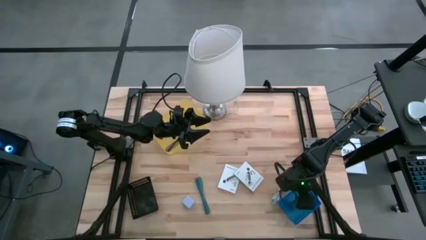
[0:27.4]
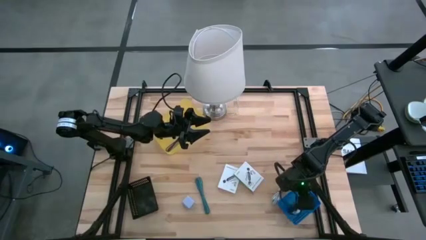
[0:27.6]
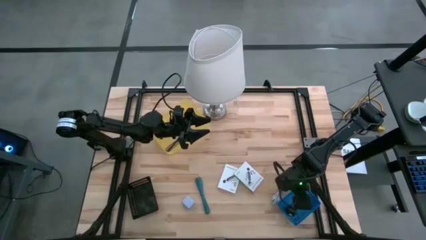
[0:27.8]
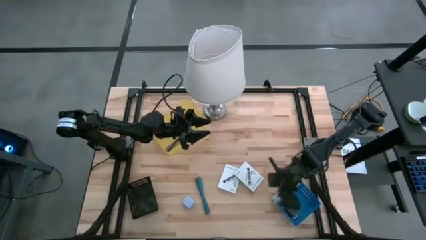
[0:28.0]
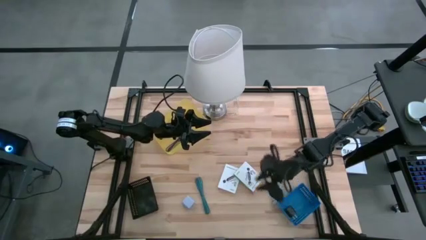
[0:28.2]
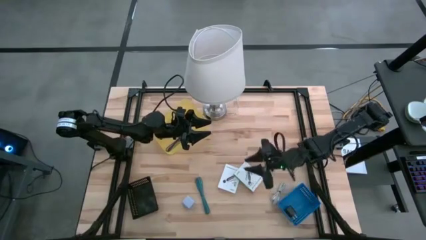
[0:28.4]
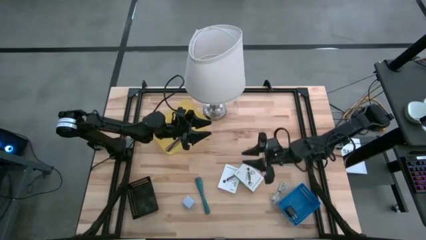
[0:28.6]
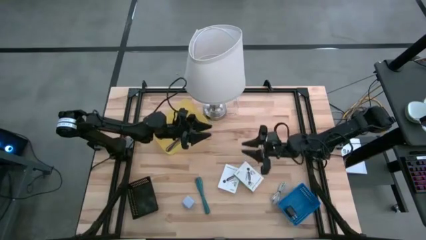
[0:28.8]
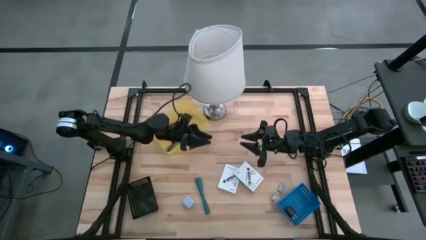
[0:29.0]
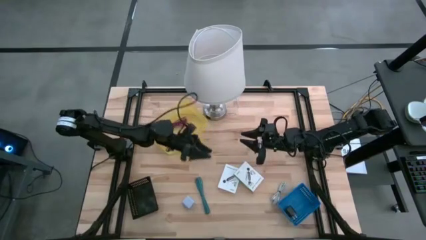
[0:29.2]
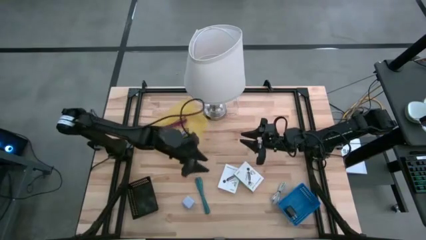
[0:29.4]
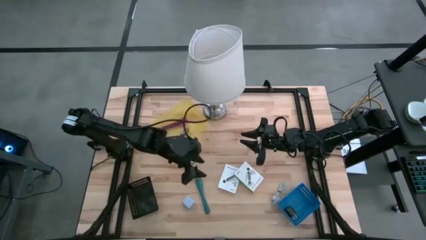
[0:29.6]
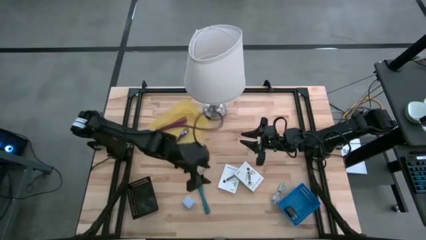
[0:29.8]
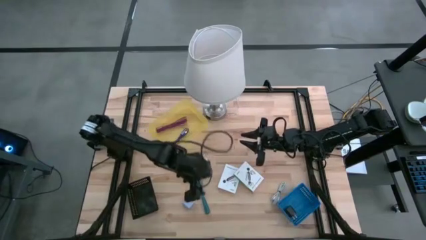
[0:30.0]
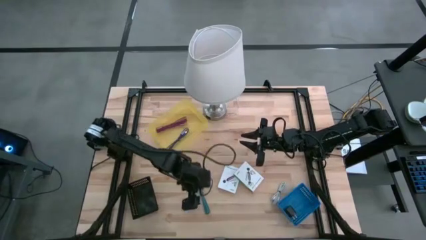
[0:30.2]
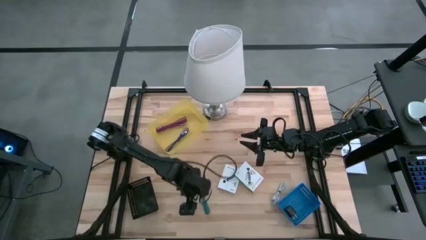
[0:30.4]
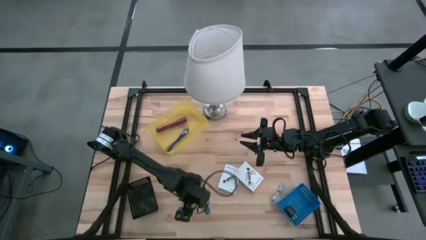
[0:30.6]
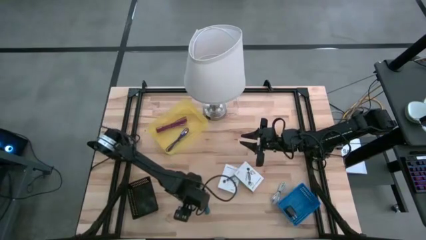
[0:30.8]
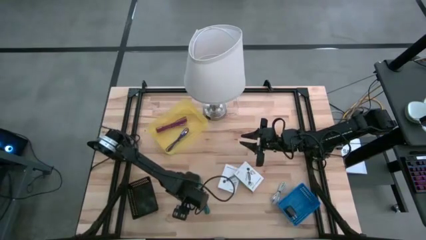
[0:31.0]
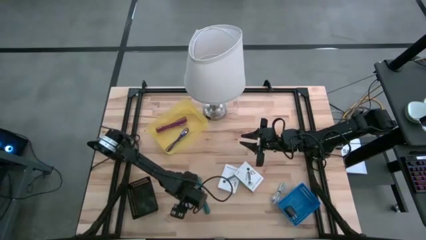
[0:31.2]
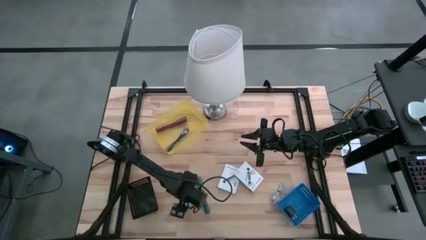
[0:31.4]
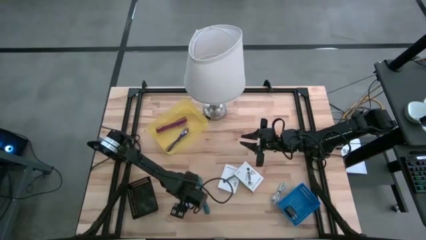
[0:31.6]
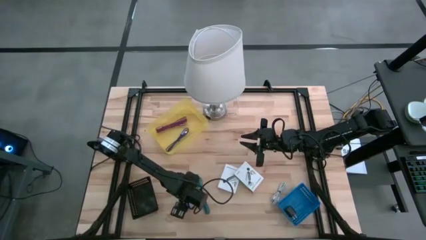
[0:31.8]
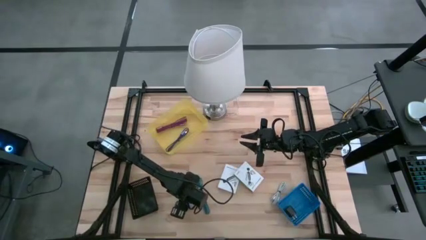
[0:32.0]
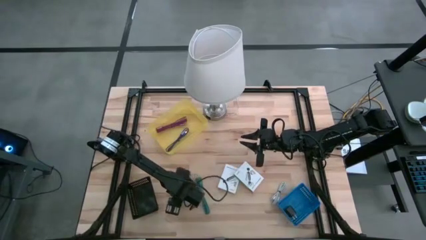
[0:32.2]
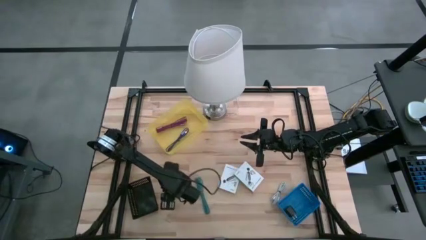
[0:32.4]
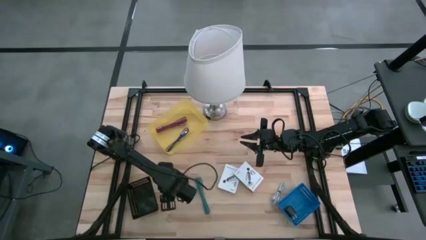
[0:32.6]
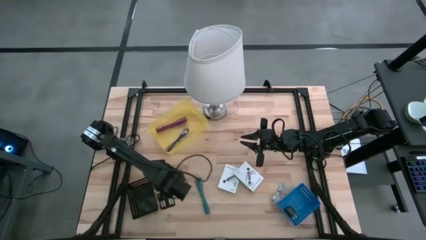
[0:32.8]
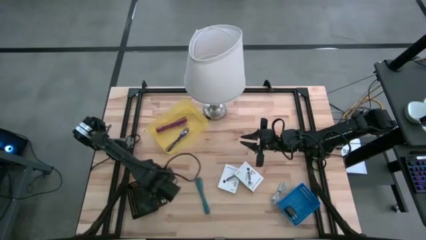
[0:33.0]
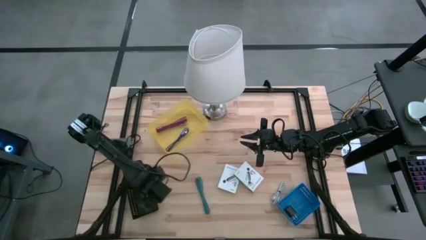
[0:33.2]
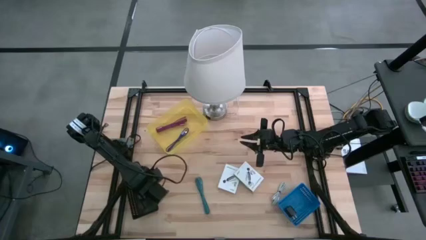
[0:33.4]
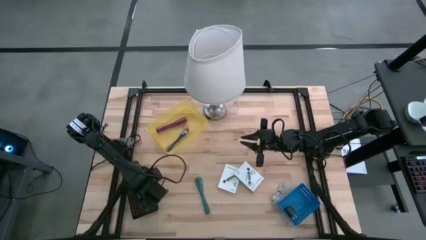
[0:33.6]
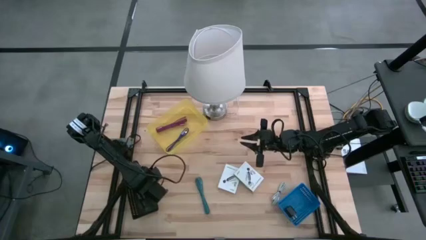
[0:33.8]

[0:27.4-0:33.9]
Task: Pick and place items into bin
Put the white charger adapter into the black bin

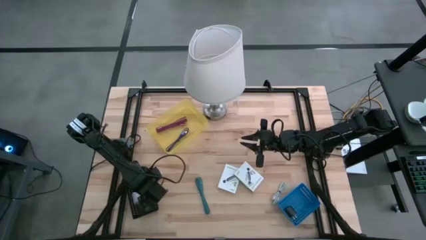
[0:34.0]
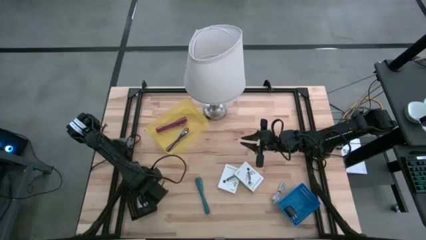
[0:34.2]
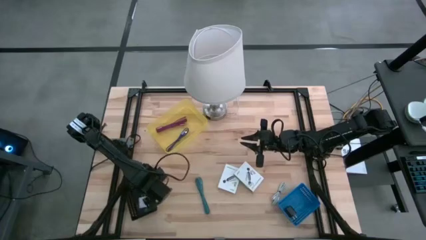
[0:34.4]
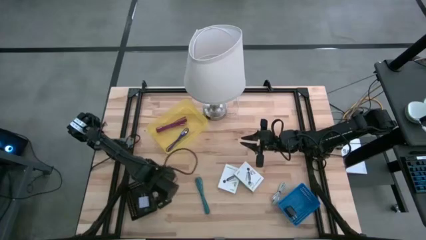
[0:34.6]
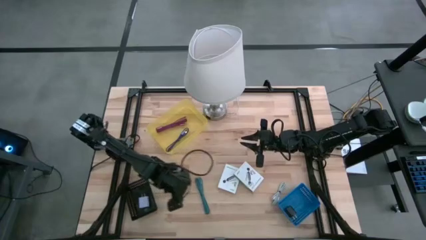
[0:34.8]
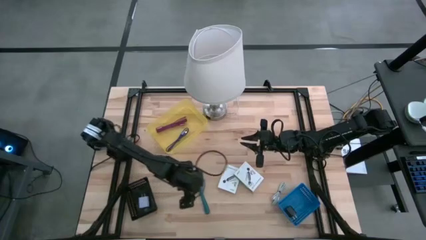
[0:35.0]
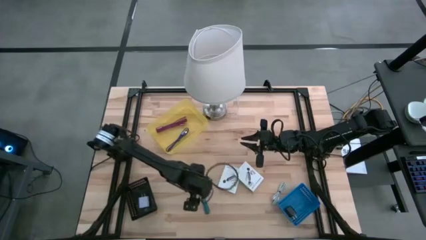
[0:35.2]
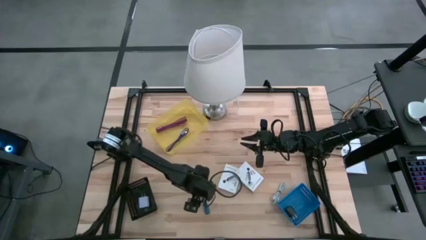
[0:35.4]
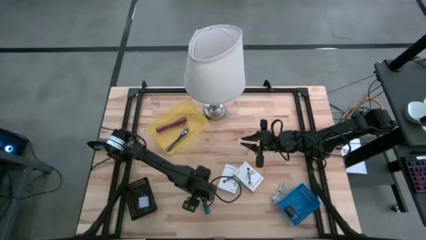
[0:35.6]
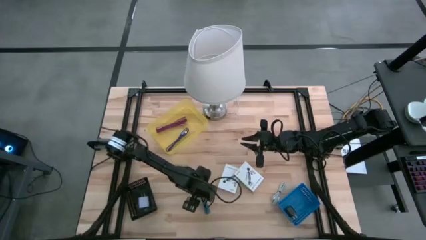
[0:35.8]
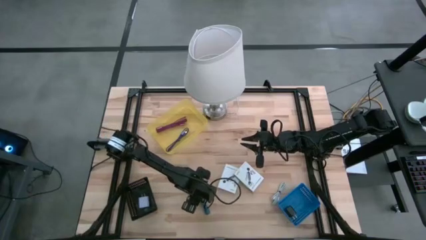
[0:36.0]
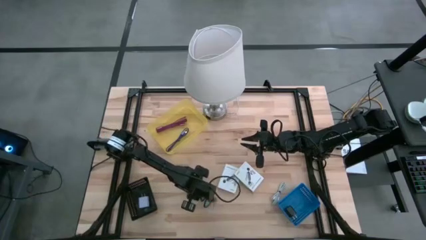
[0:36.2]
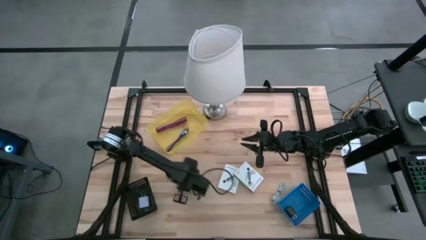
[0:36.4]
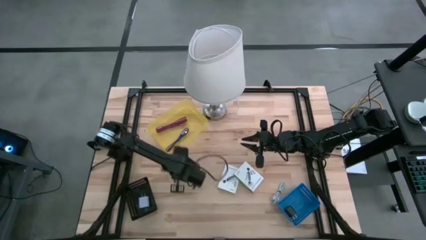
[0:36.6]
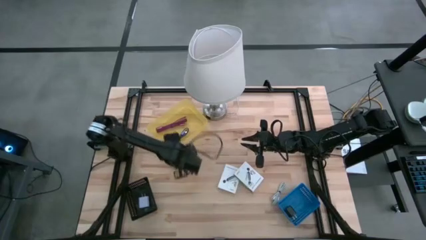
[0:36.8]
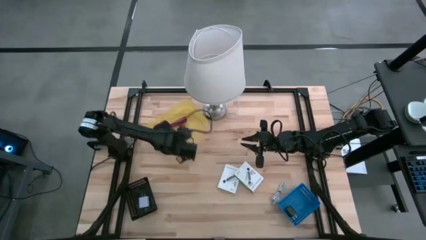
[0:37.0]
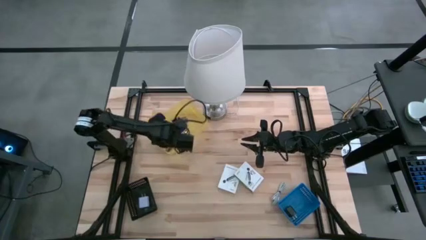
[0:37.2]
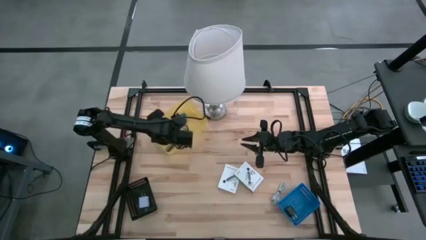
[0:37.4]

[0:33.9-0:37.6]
Put the blue USB cable into the yellow bin

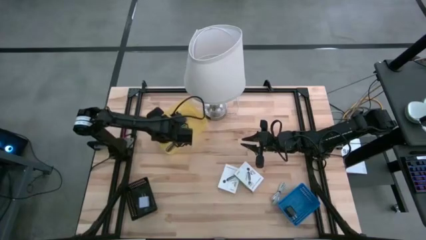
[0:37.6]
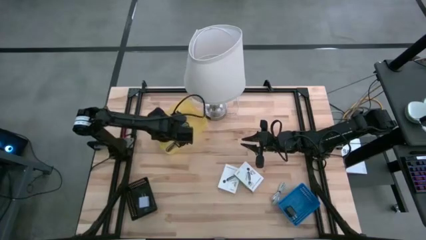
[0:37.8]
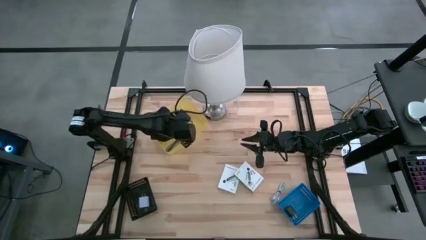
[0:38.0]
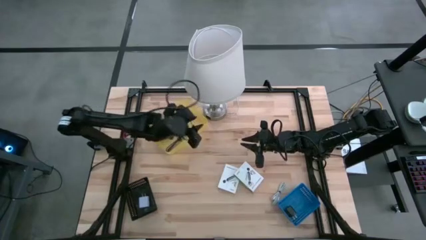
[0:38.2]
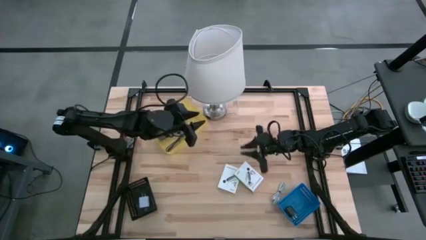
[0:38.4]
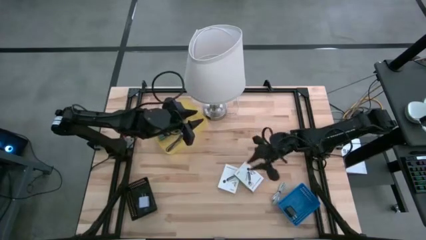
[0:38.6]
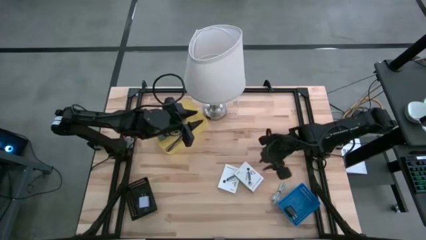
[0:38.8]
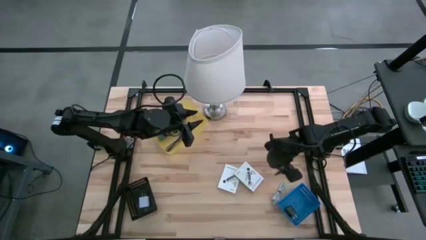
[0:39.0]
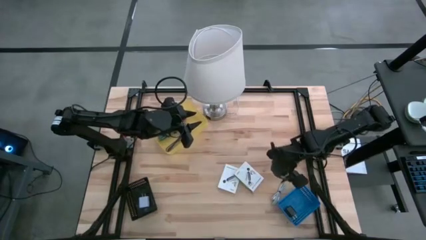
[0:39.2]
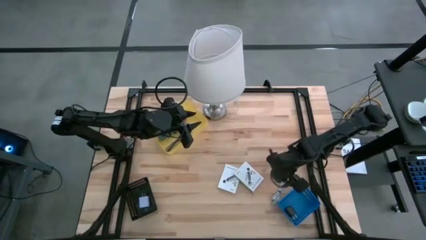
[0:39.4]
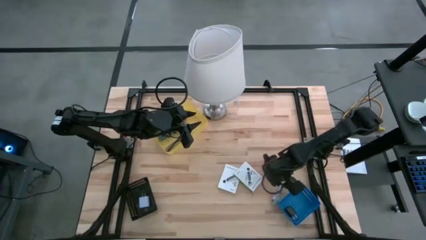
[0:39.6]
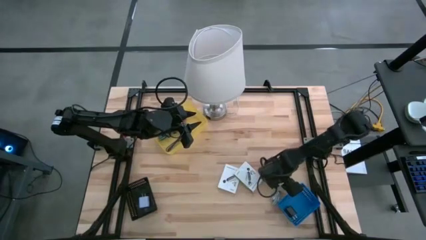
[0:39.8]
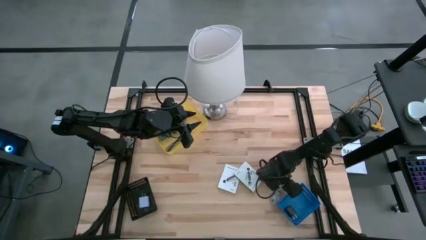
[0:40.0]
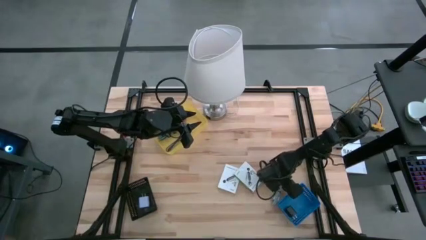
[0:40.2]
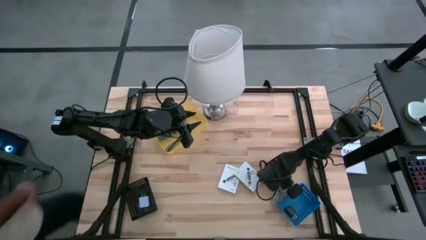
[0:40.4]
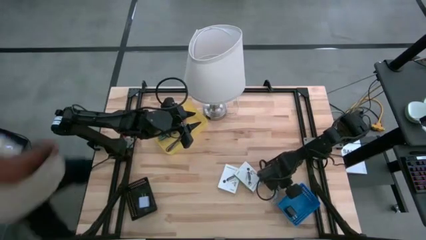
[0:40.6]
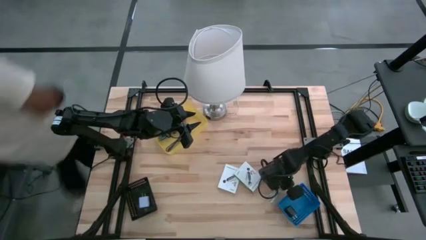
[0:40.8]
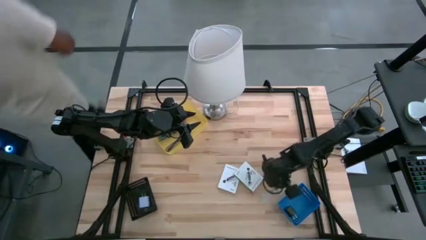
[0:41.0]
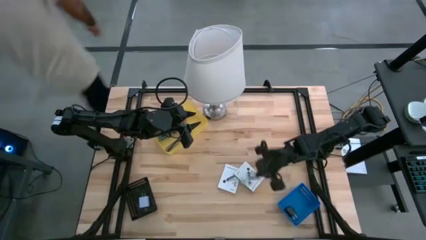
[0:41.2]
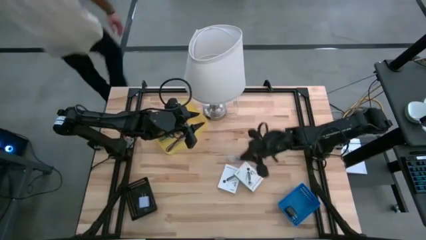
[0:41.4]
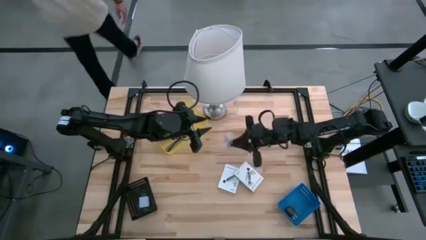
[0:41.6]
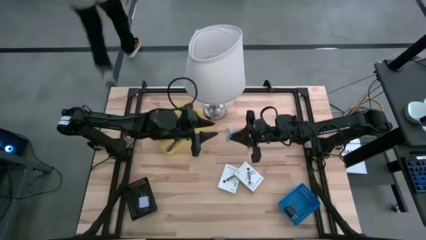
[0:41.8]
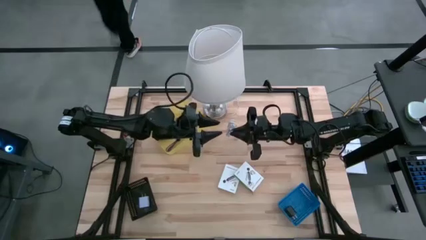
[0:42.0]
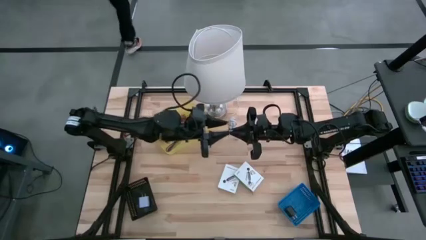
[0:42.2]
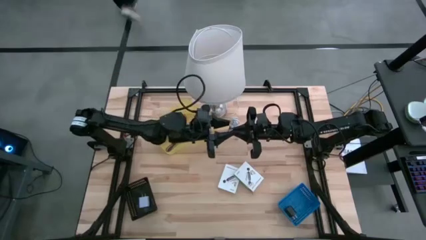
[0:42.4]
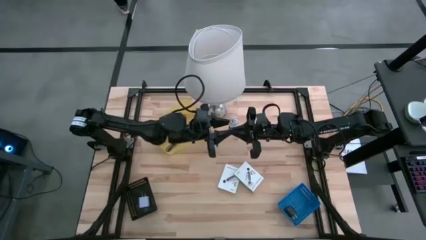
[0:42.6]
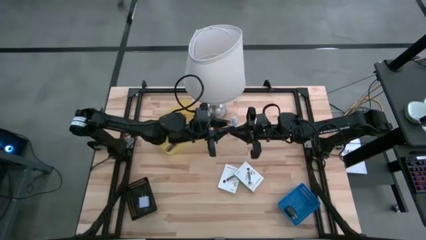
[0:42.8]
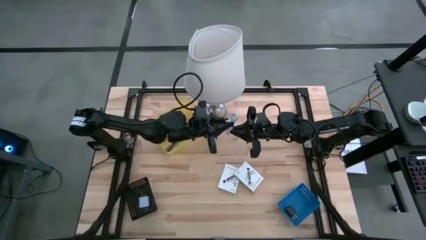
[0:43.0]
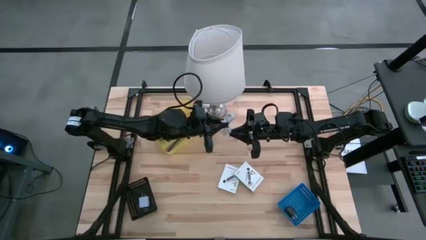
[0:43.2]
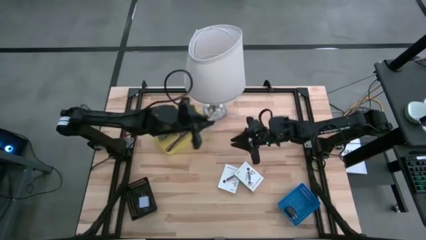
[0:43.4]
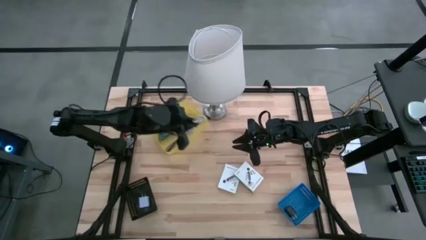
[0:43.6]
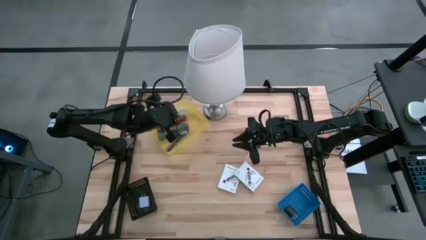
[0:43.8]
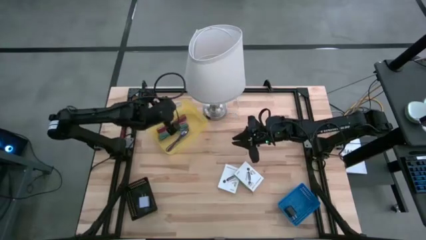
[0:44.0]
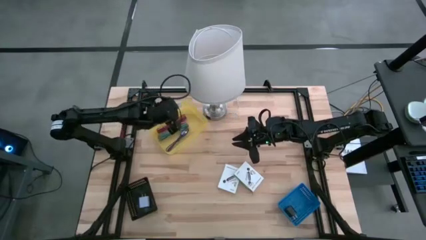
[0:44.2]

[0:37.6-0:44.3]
Put the white USB cable into the yellow bin

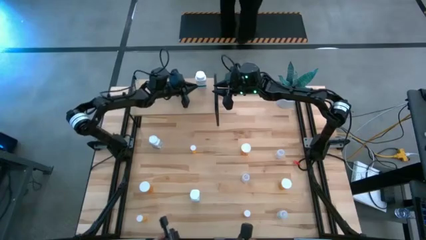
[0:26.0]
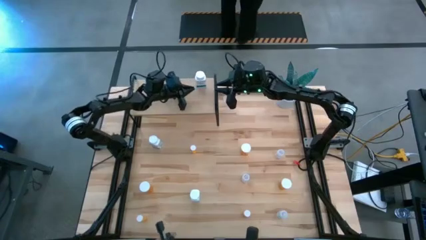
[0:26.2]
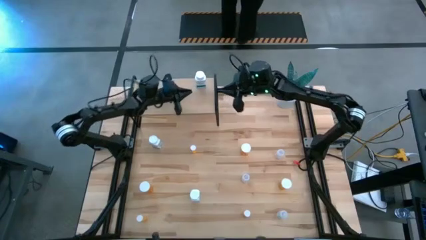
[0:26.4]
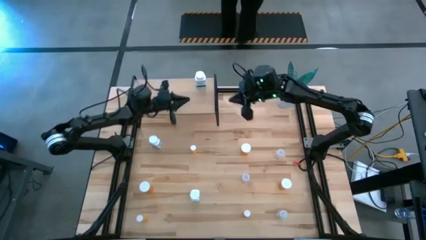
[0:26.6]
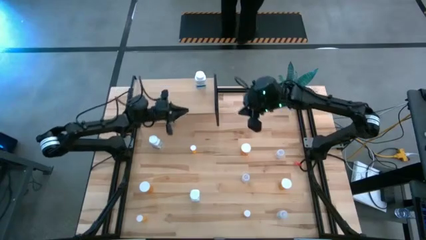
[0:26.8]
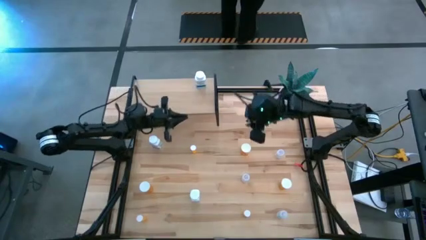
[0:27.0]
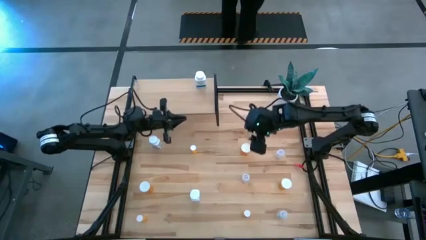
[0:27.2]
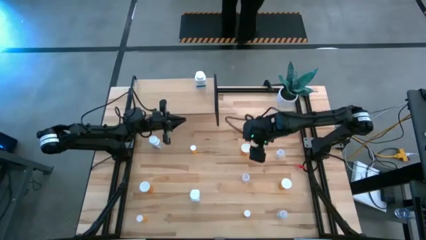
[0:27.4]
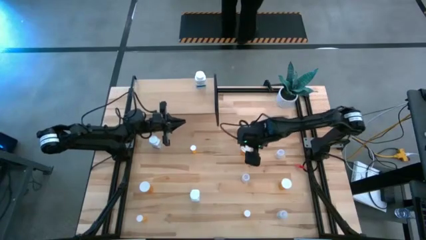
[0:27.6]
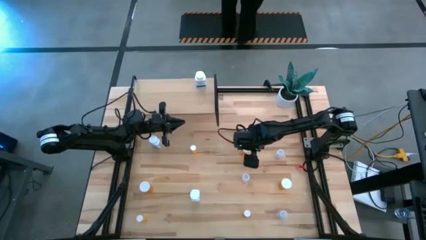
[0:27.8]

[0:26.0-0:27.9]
Task: Pick and place medicine bottles onto shelf by color
Put the top large orange pill bottle on the shelf
